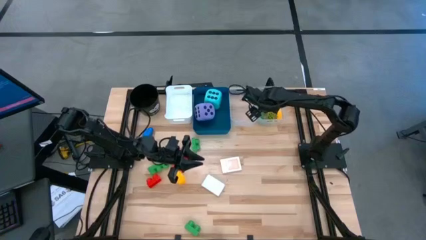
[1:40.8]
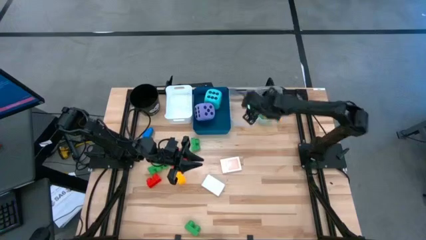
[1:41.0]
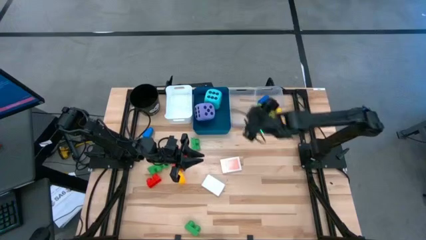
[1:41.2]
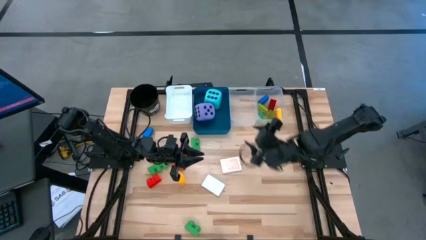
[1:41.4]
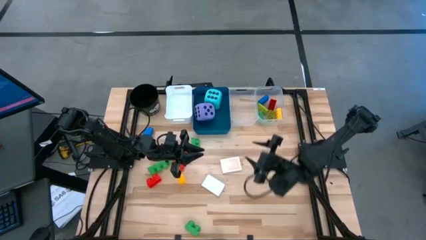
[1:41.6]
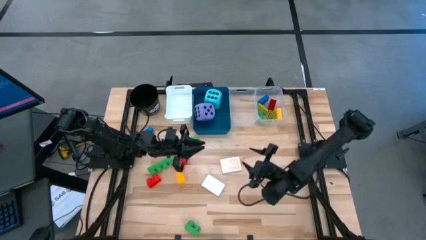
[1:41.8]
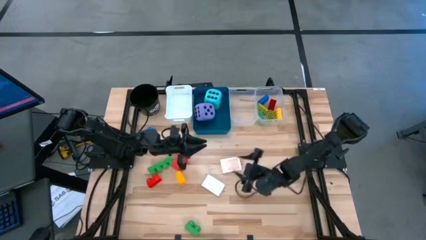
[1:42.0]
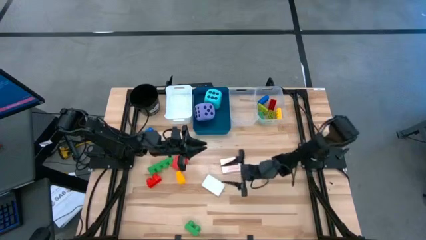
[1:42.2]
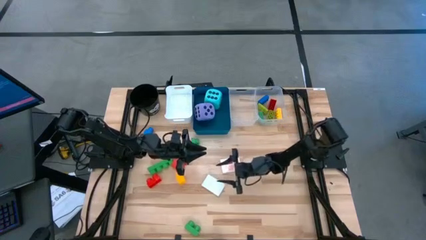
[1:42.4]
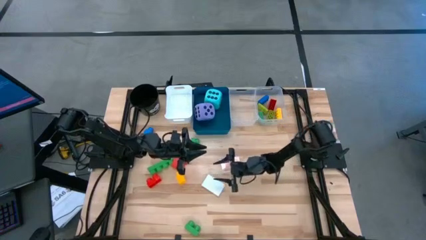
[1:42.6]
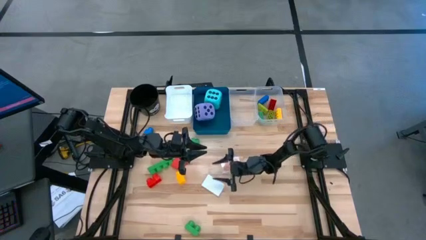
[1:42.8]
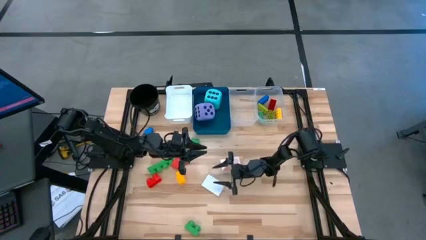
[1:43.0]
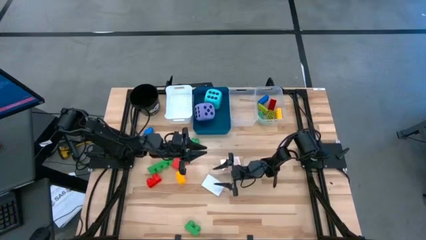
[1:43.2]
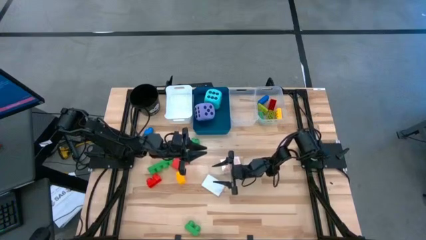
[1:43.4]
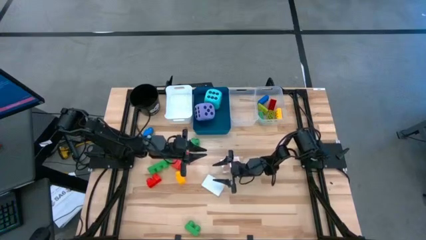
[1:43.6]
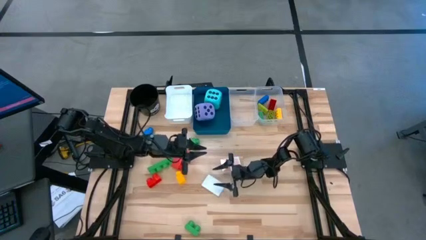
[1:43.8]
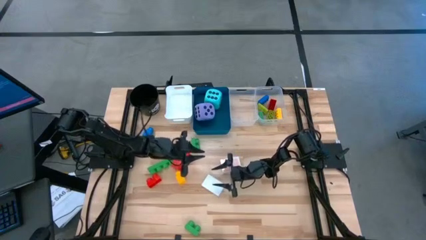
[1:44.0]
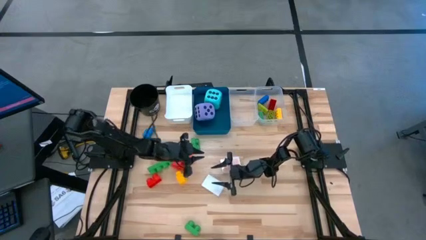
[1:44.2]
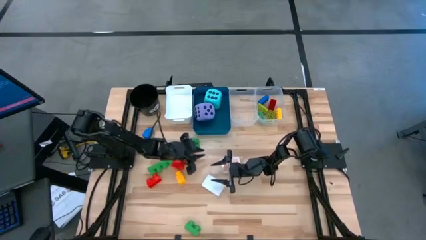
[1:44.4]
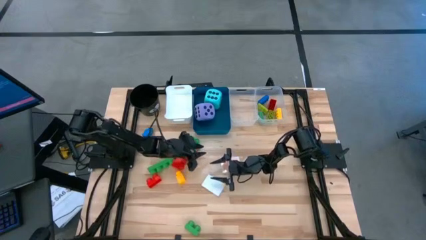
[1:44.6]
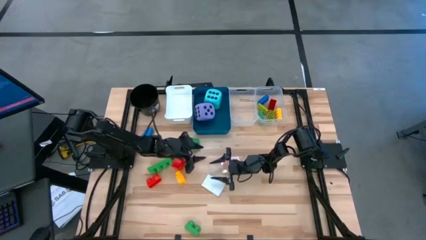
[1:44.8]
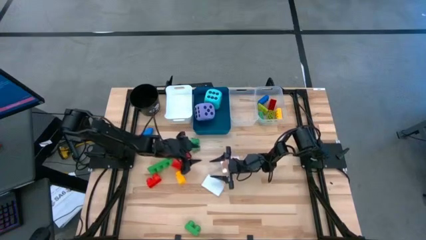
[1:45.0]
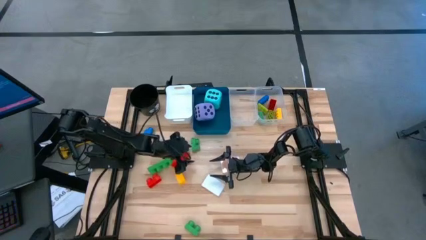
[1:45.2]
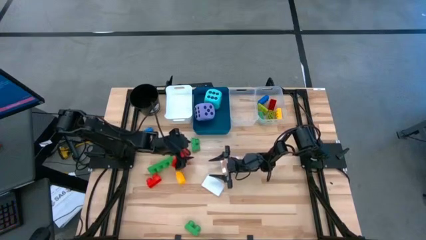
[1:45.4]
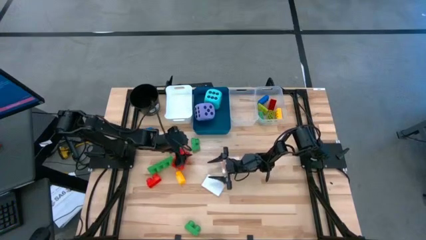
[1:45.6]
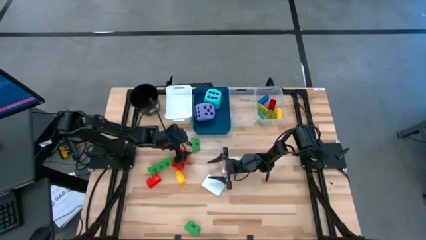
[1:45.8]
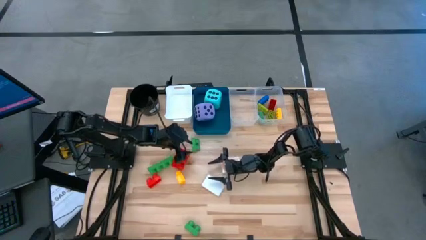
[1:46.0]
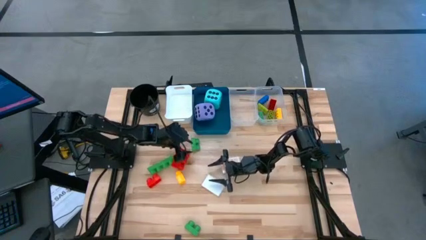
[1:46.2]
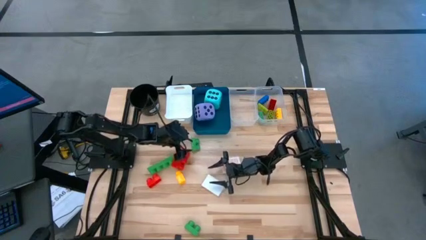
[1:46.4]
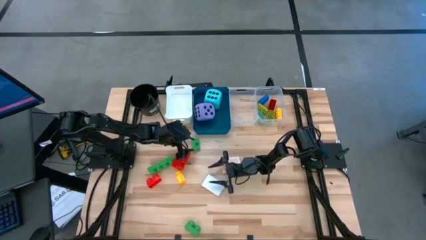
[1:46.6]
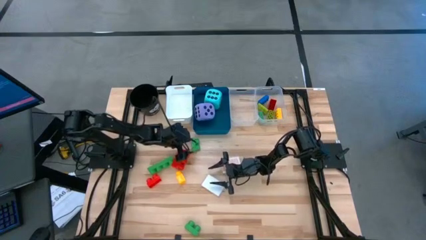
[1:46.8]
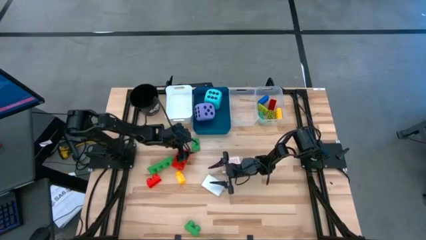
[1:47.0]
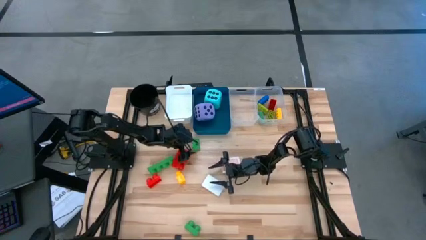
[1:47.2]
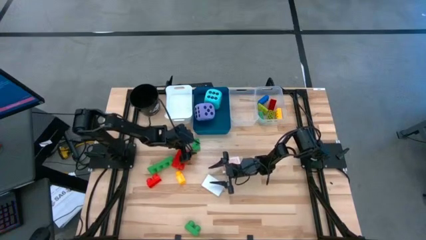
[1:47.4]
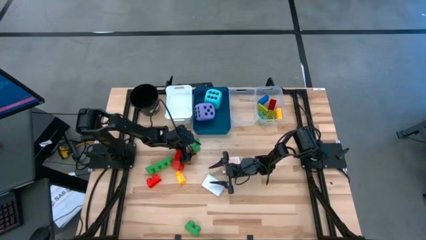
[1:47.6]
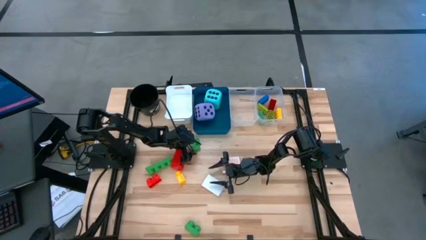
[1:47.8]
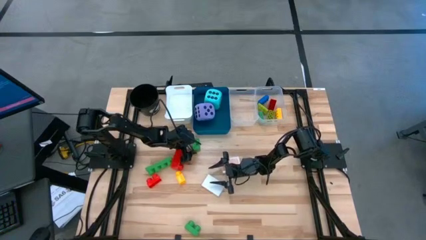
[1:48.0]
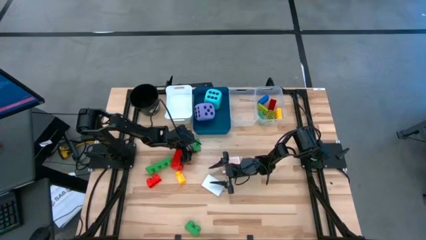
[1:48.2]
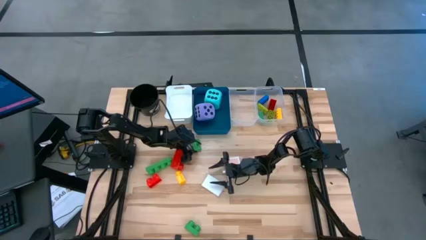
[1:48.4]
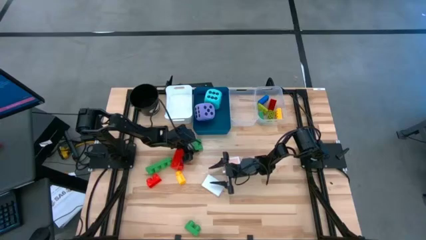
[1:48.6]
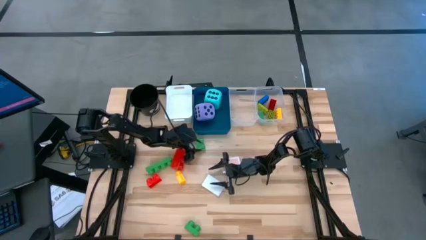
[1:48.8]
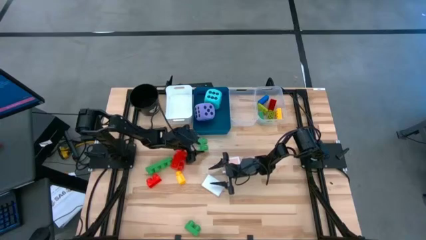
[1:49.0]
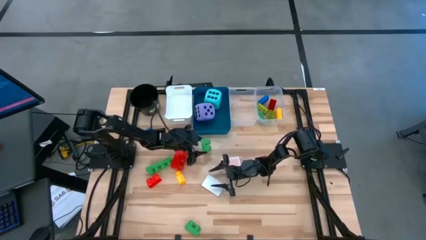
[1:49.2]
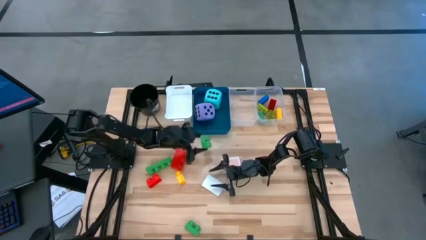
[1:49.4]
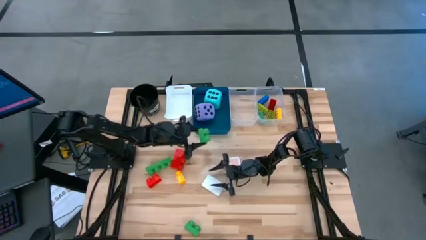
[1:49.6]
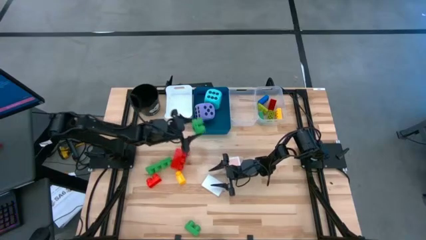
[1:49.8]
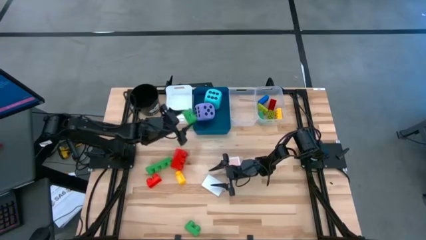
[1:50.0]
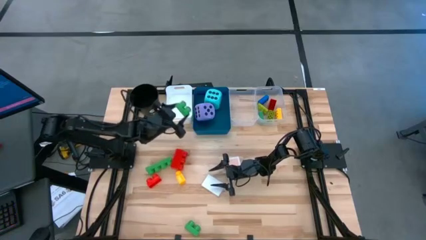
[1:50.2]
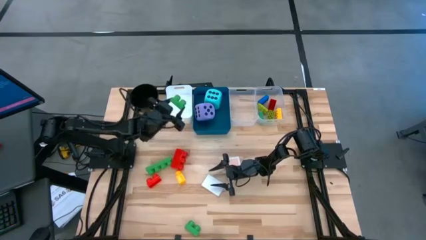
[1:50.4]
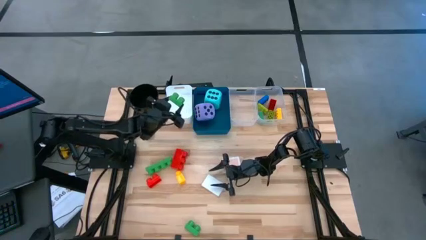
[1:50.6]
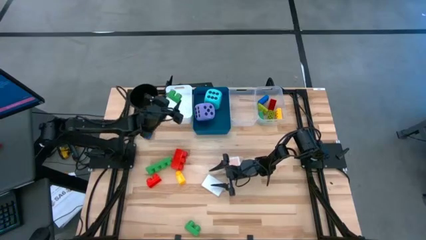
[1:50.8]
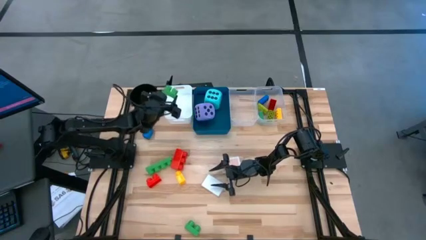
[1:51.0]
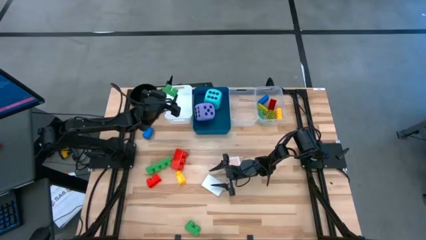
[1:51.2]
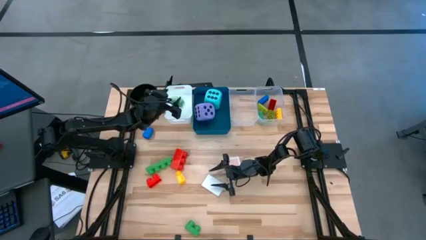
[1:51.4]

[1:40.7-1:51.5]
Task: Pick & Place Toys
Put the top large green game piece into the white bin

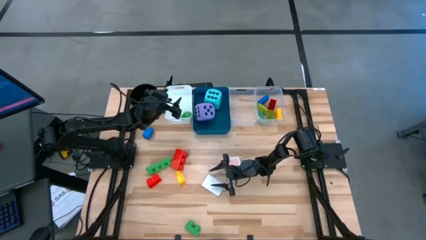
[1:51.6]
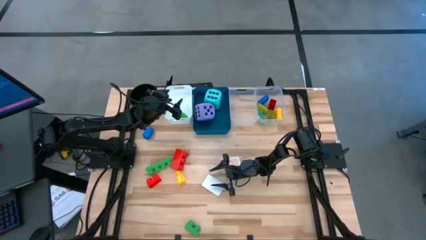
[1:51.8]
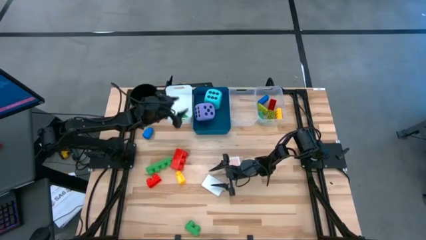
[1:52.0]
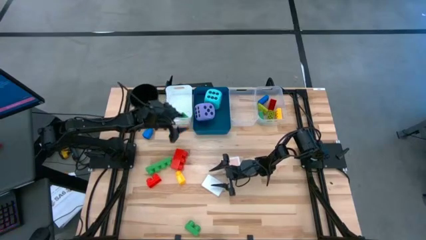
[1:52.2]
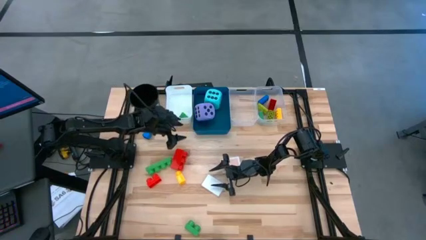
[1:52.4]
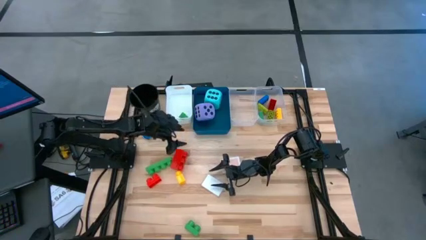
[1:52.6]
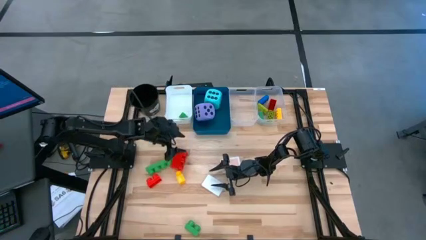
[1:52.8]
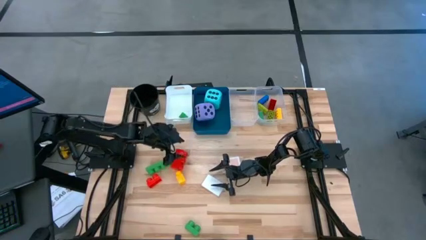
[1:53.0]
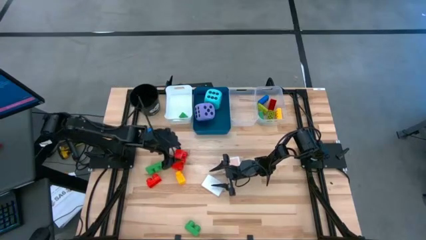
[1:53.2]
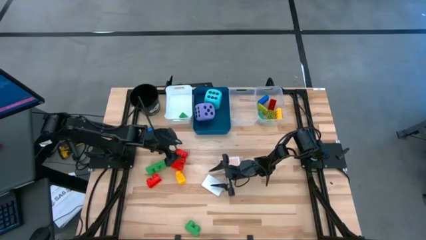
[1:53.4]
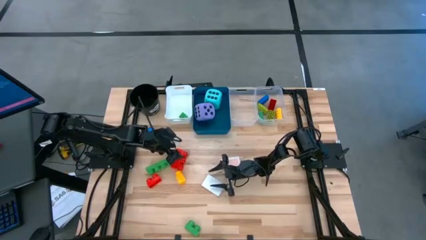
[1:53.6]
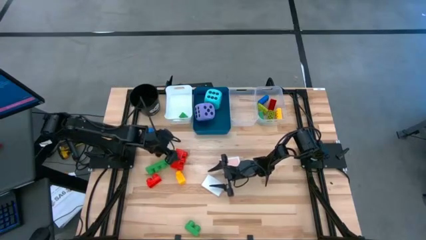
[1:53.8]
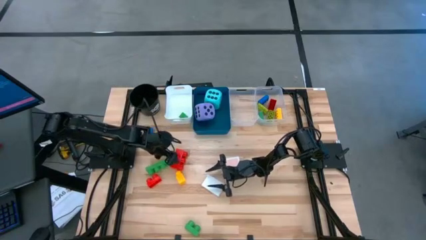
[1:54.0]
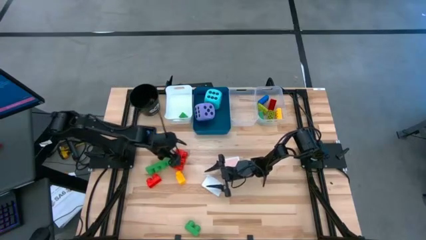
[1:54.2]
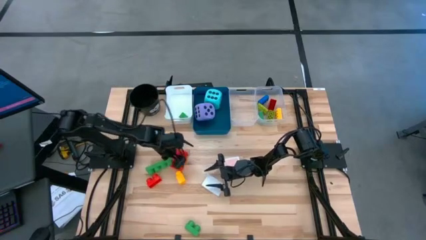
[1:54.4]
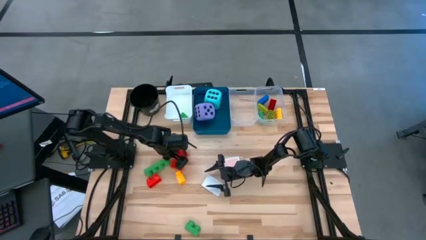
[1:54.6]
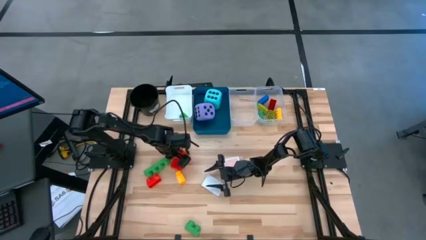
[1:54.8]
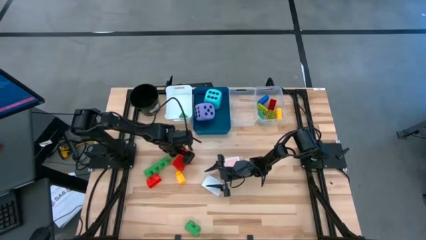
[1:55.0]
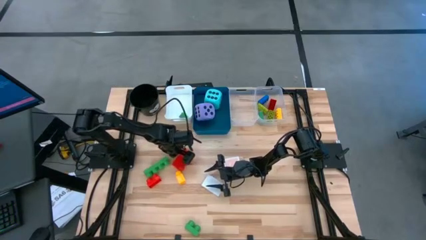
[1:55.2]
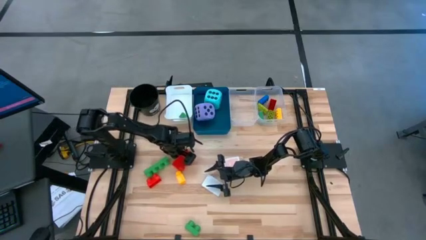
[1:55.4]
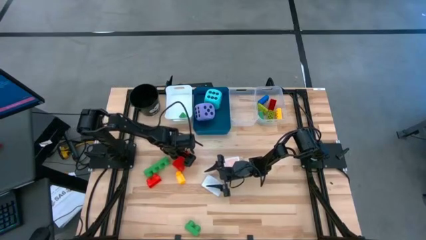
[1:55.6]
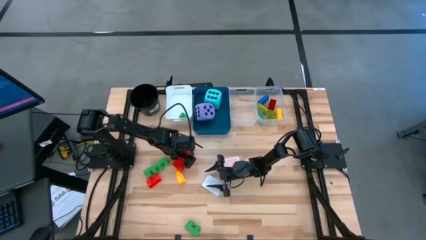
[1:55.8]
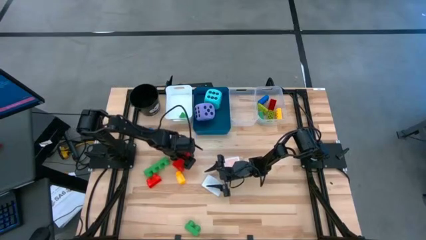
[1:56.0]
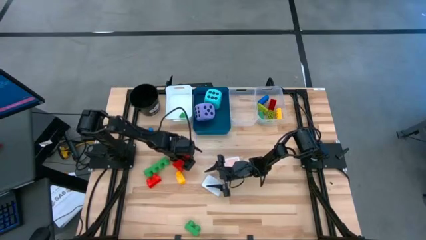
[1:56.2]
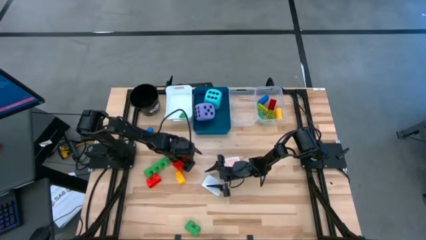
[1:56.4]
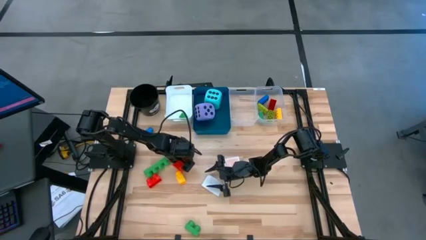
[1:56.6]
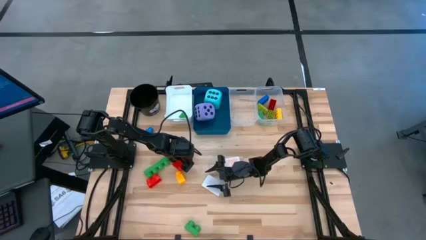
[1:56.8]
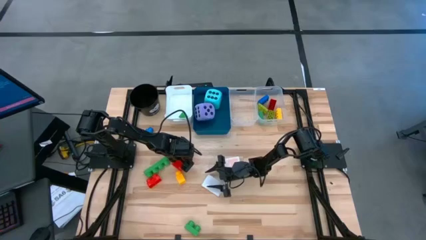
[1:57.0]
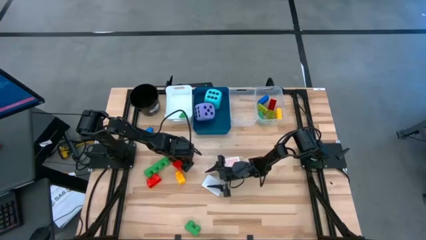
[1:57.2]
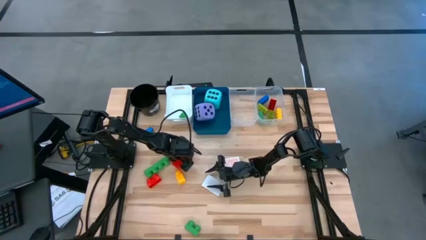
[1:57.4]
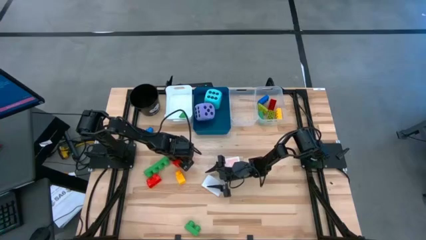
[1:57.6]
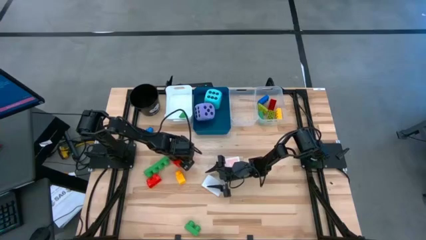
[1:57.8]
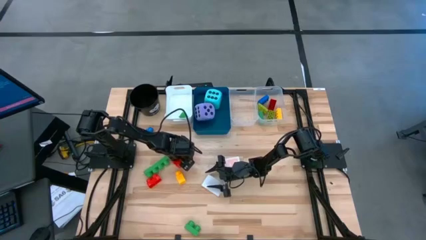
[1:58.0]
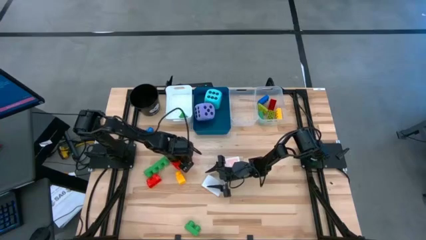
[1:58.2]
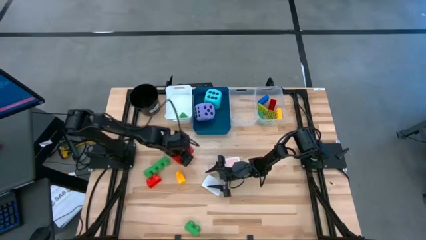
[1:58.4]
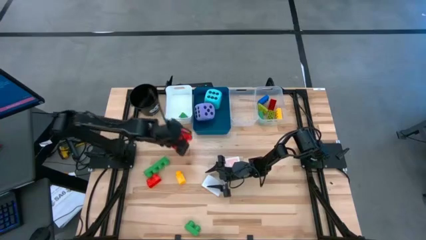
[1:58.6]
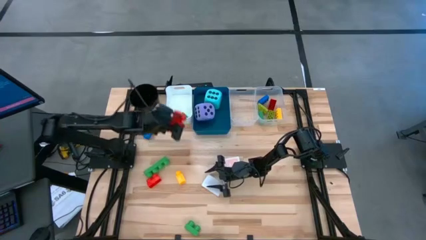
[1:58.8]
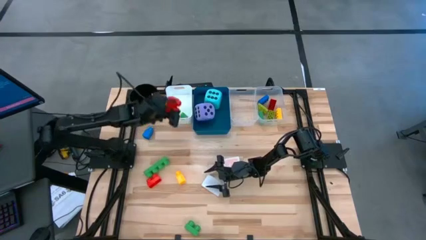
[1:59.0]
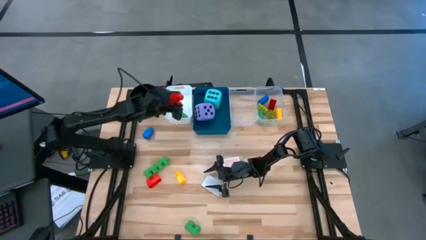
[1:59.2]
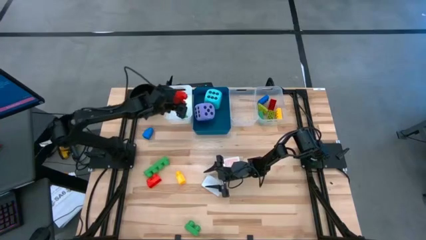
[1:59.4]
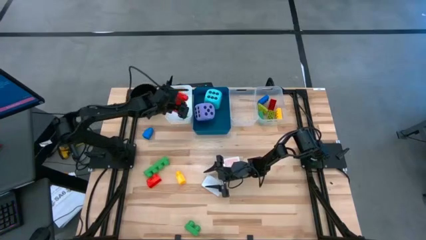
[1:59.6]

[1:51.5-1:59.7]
Put the top large orange game piece into the white bin
